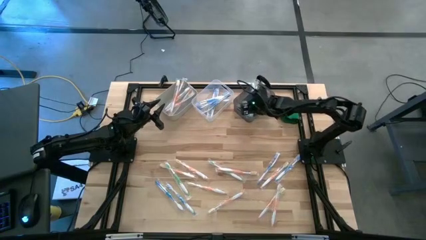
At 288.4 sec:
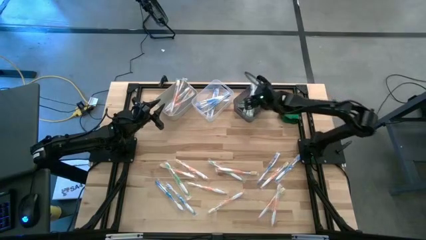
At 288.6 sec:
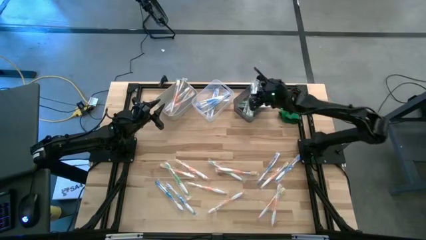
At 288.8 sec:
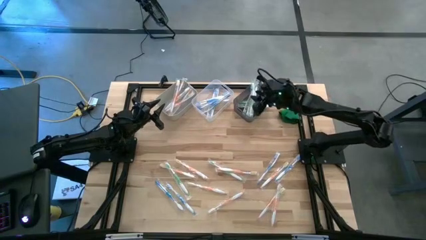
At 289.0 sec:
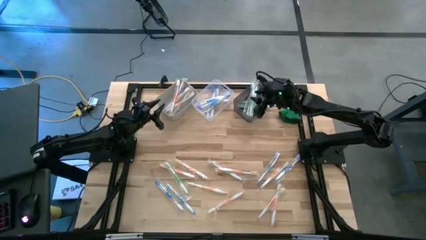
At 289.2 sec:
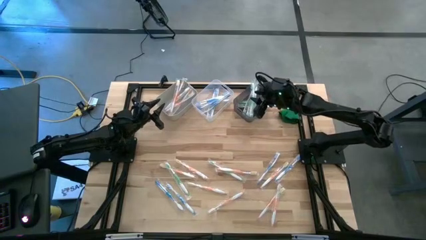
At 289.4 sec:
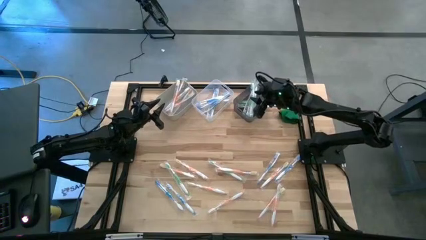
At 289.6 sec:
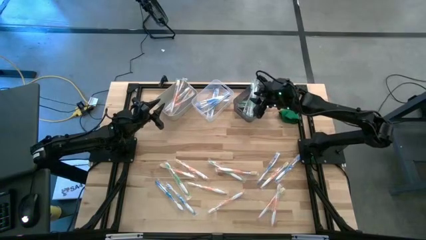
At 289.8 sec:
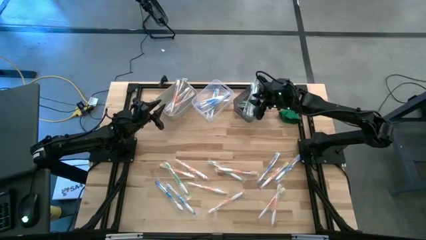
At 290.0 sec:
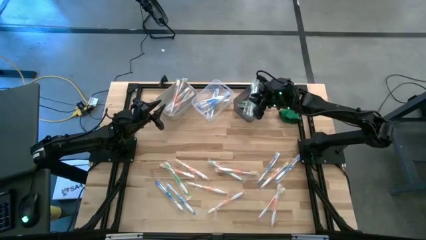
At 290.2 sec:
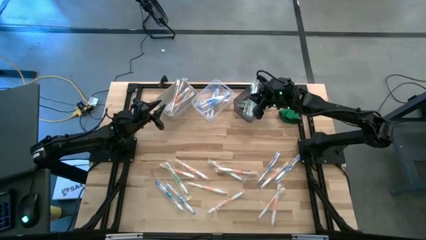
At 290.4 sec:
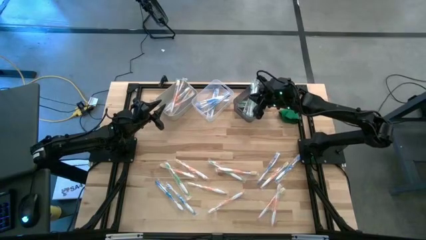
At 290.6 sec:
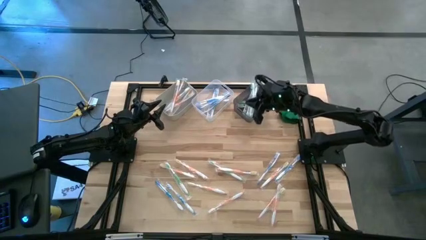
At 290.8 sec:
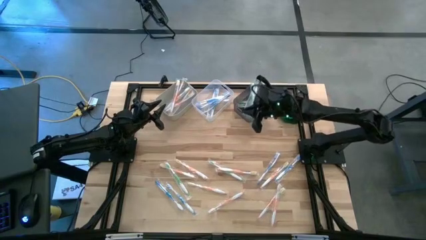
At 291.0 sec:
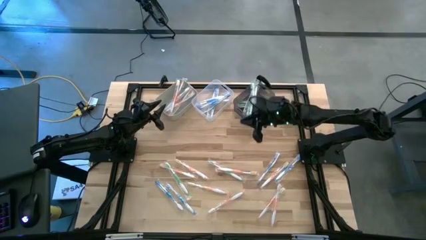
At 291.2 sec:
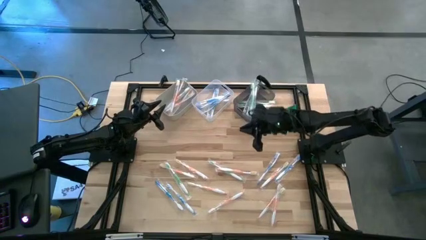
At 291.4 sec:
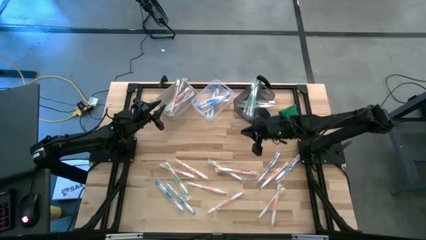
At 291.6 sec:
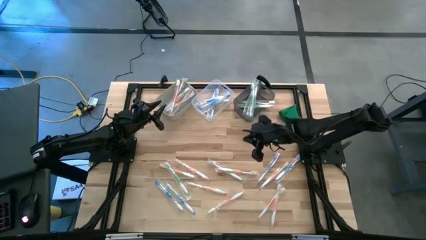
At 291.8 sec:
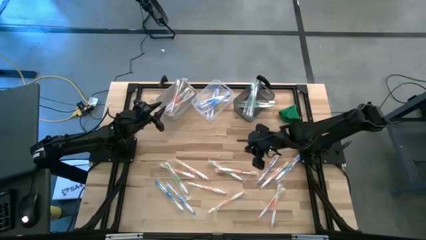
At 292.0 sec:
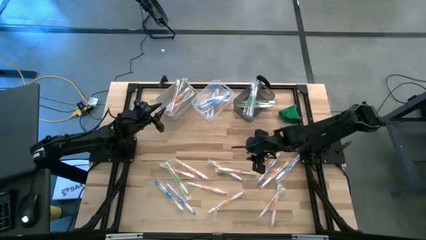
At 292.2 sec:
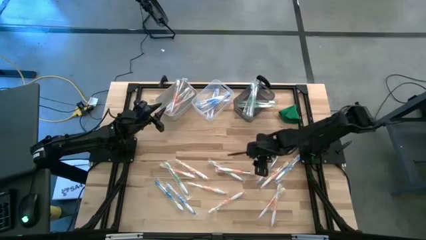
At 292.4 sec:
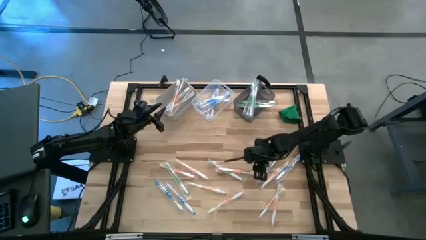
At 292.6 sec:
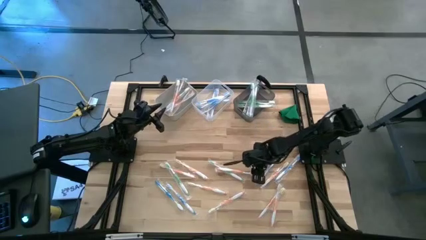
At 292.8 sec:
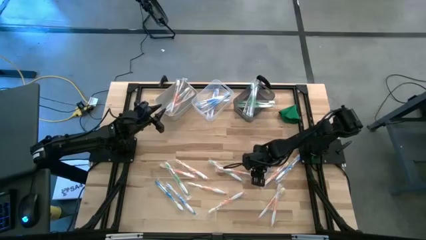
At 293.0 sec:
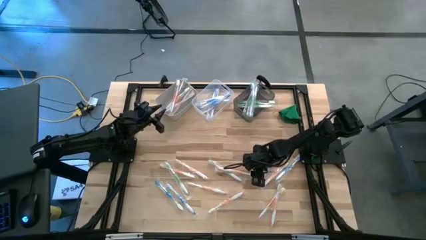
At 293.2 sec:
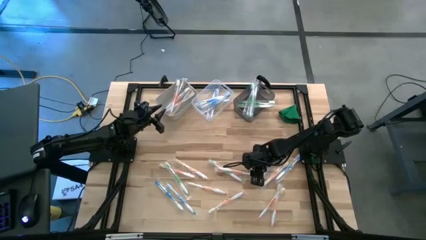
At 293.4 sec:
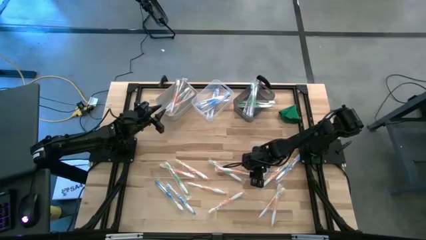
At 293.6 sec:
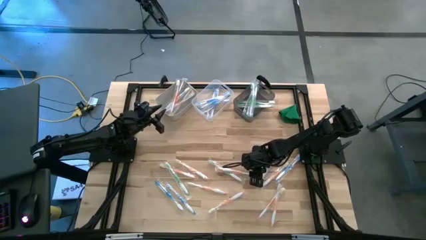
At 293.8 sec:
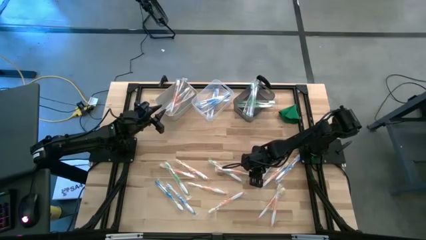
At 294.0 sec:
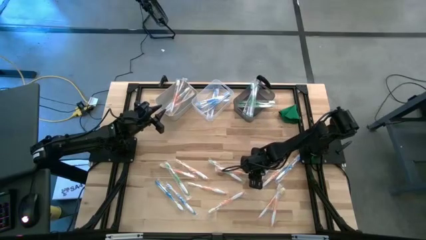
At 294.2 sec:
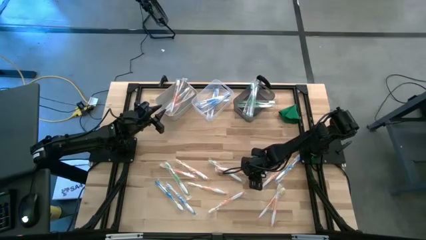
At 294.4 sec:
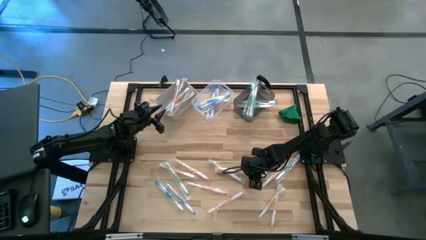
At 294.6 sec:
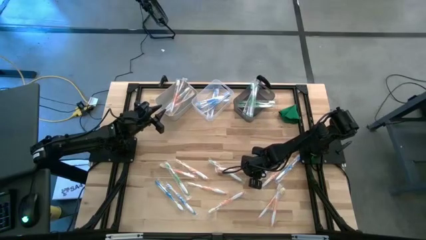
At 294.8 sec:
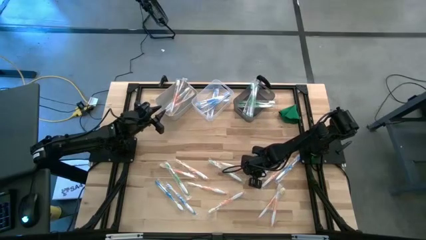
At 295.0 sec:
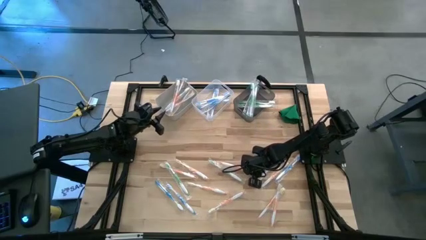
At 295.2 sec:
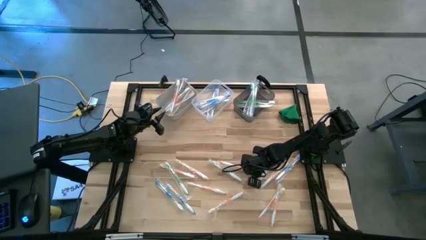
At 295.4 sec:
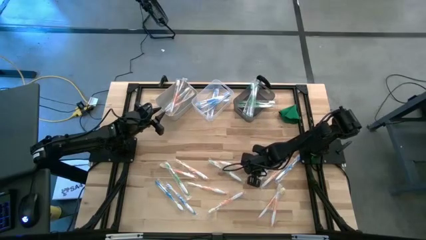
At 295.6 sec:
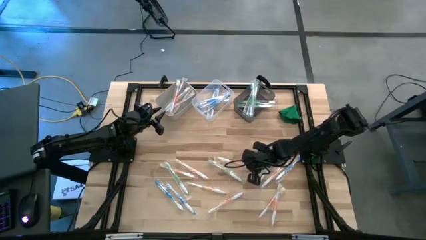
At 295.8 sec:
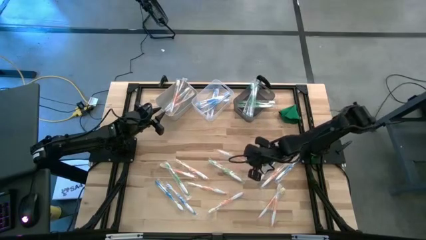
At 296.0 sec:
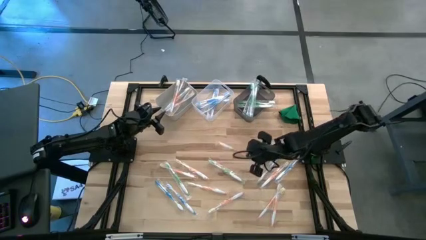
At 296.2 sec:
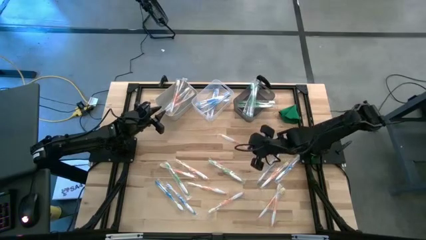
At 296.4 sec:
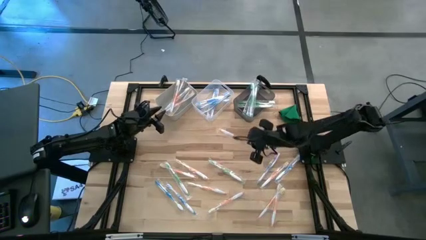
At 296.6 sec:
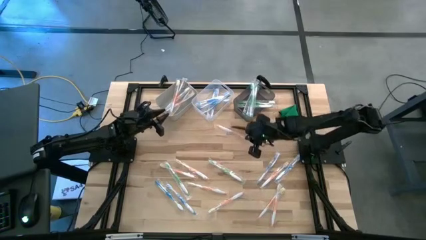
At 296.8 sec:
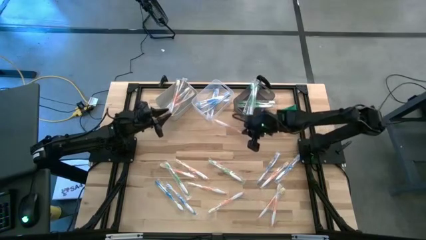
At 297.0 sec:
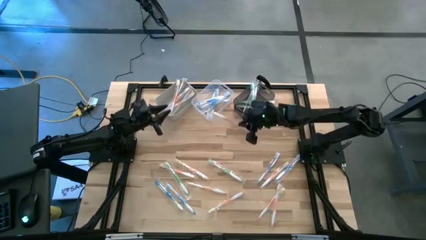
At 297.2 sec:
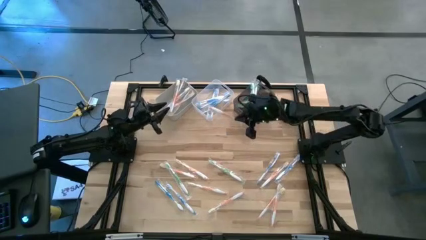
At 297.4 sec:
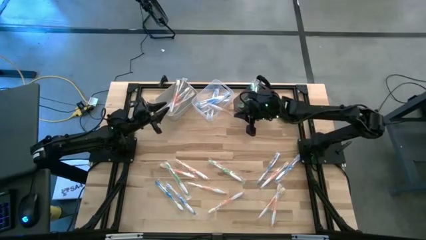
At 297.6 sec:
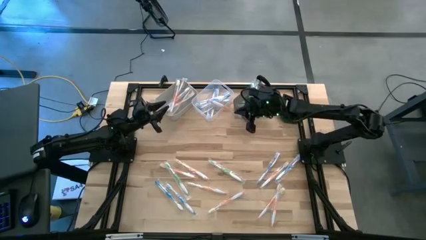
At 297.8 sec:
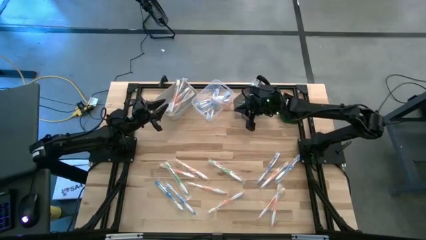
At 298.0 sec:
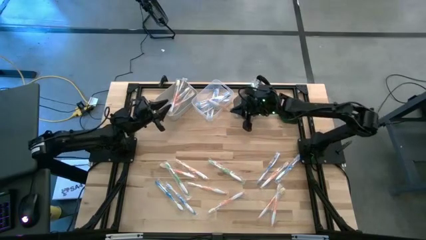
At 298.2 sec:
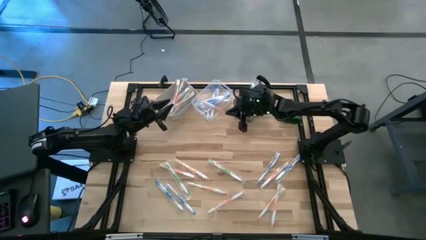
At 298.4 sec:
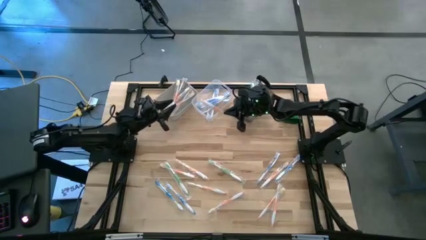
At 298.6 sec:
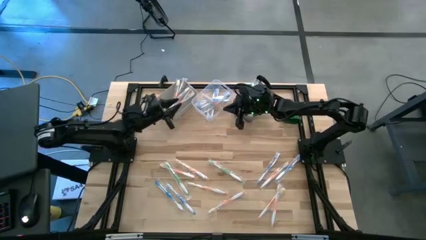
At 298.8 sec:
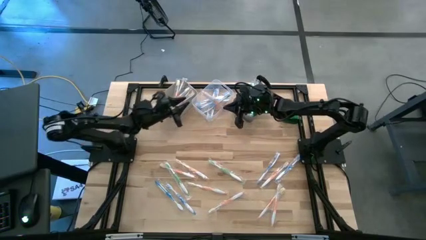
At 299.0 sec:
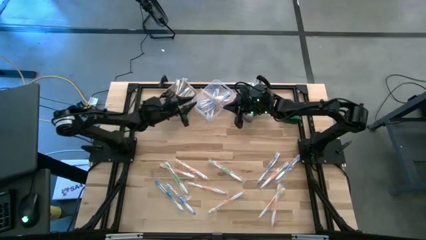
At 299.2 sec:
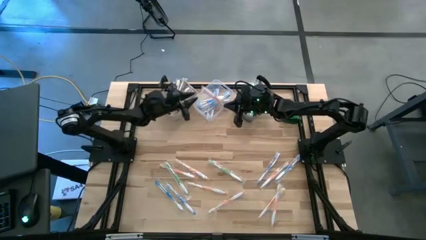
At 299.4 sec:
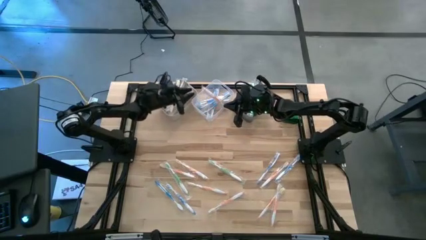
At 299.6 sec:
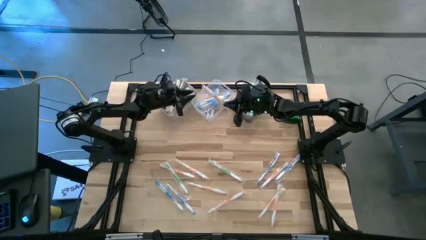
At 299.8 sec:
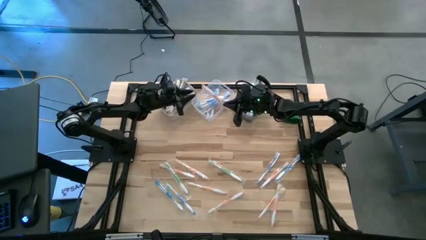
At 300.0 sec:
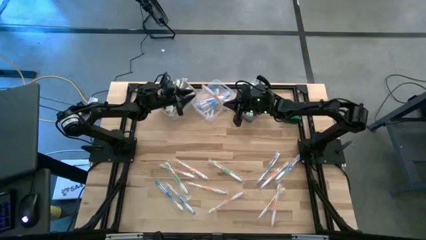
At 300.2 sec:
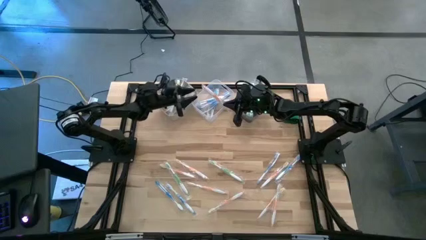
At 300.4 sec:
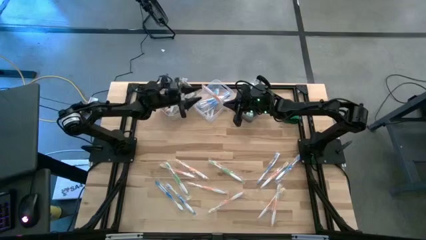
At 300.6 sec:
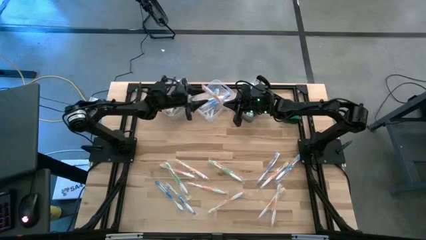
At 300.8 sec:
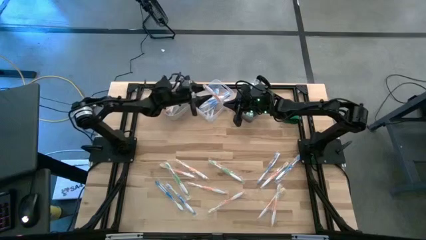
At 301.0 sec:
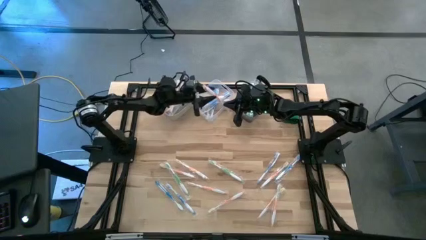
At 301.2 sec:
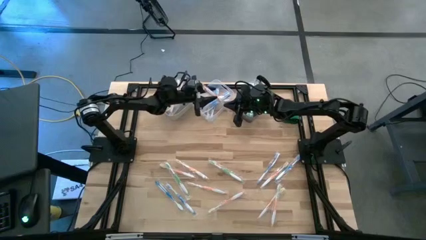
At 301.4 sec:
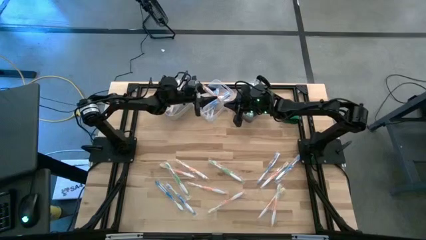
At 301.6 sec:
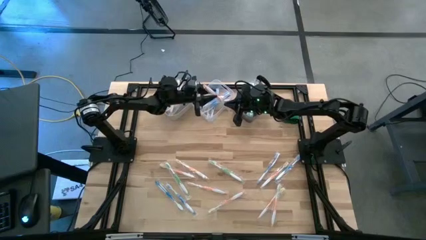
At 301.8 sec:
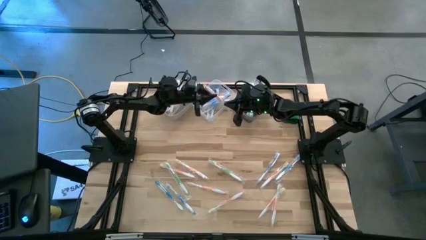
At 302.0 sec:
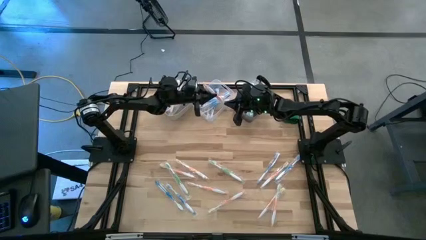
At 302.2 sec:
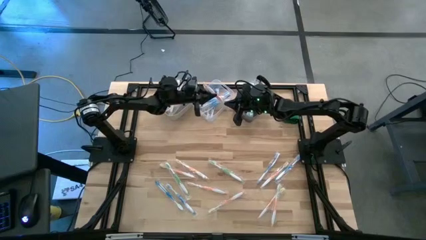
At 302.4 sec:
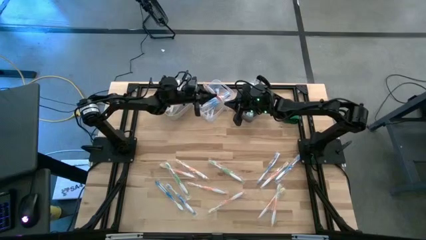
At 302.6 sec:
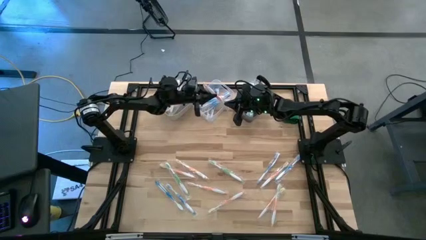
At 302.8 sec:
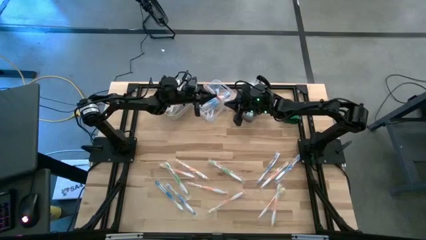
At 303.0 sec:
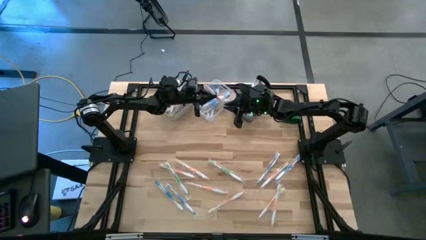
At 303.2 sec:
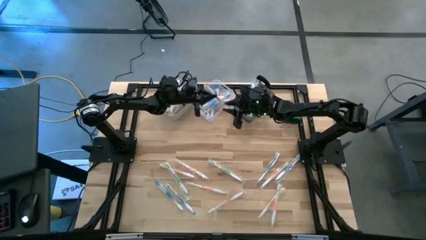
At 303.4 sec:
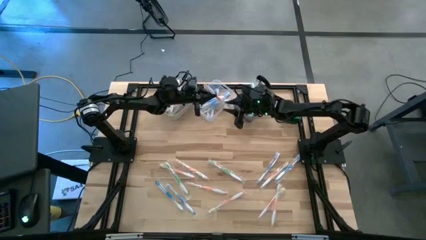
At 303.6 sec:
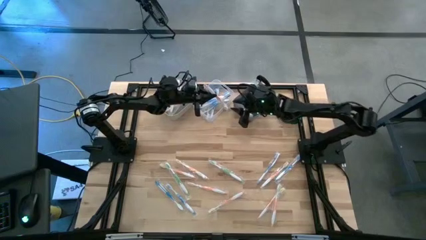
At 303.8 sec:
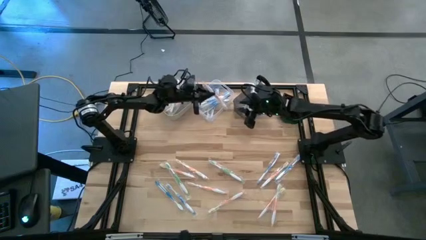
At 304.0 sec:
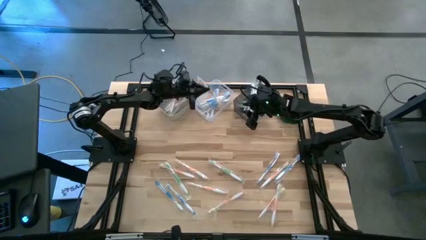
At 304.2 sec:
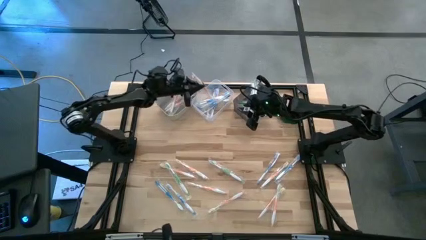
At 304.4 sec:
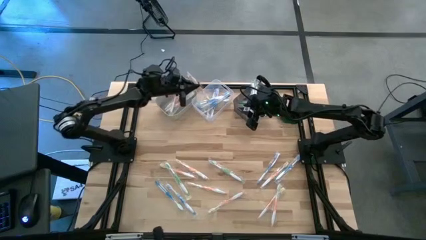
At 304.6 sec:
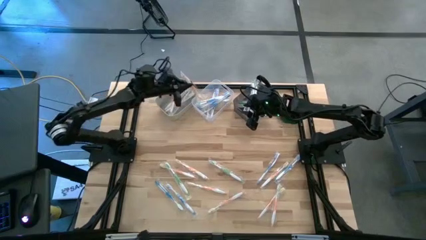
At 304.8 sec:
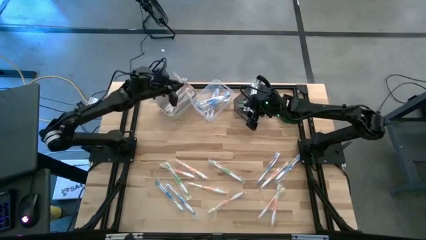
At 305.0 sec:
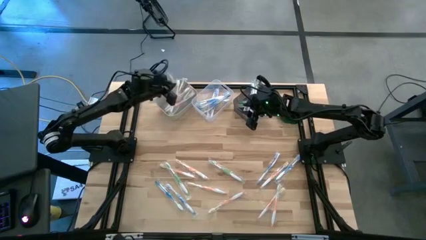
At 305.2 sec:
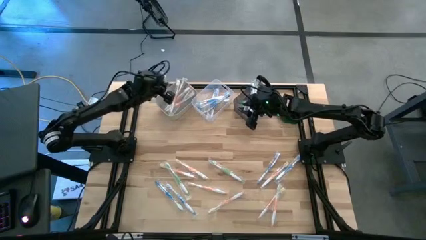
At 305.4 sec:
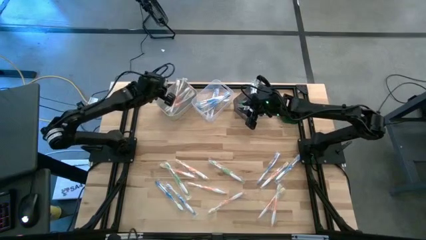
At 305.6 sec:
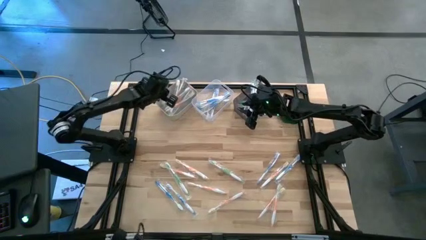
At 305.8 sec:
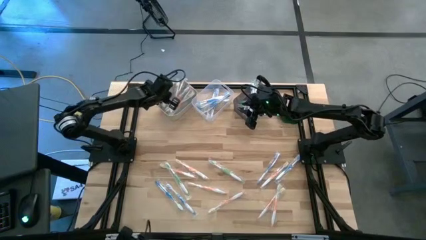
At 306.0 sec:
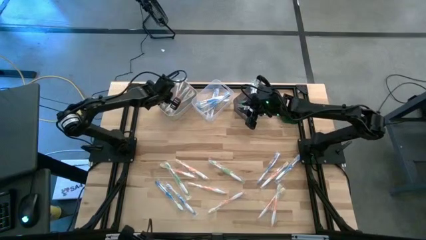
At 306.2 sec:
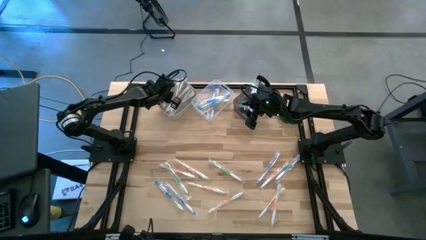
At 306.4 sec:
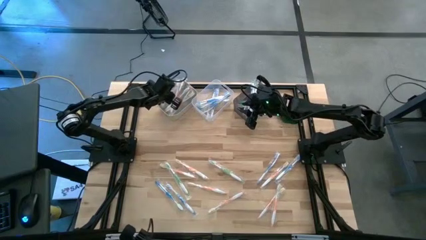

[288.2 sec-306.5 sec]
Task: Pick & Place Toothbrushes
Put the orange toothbrush into the white bin
